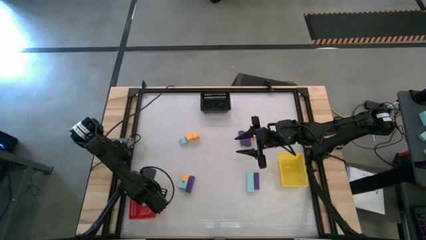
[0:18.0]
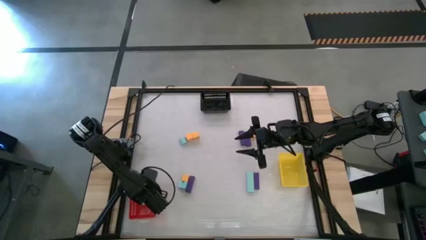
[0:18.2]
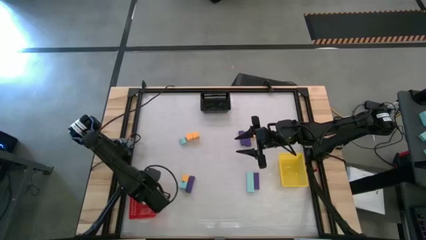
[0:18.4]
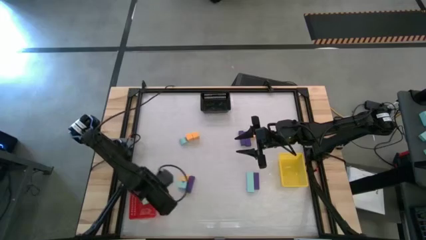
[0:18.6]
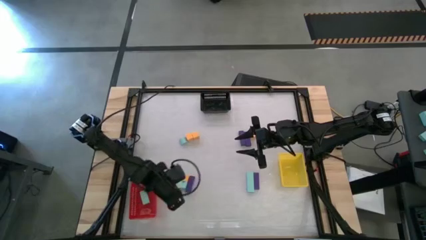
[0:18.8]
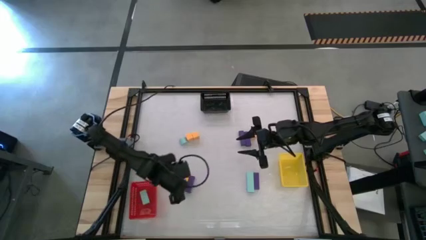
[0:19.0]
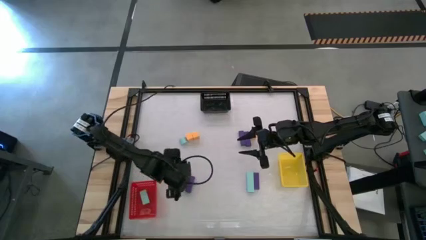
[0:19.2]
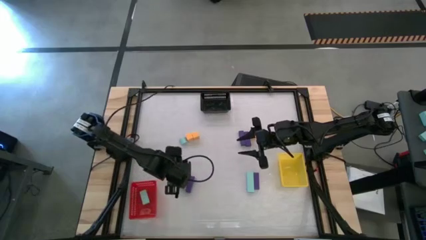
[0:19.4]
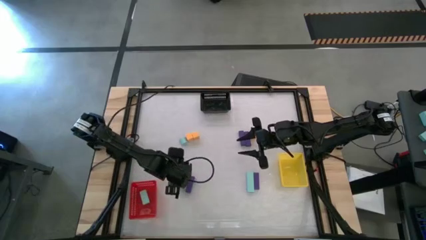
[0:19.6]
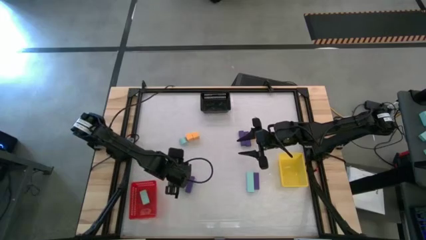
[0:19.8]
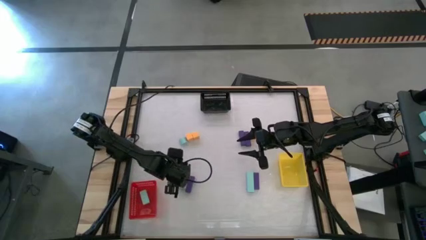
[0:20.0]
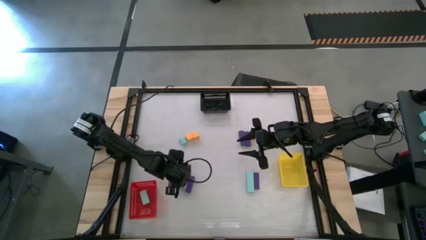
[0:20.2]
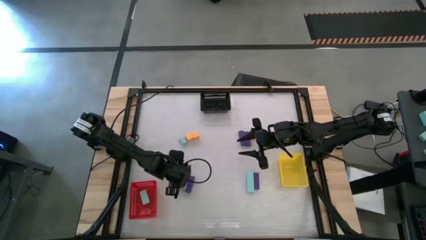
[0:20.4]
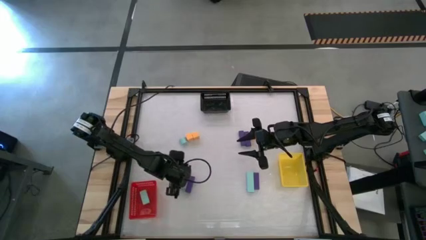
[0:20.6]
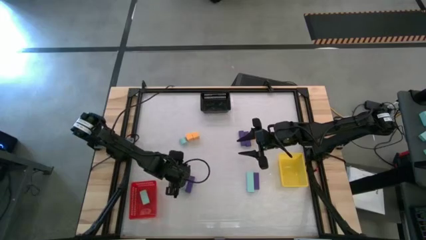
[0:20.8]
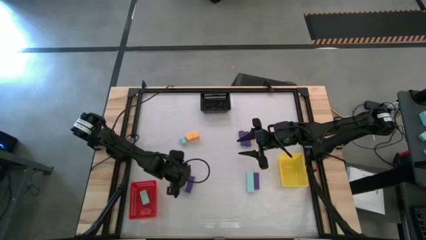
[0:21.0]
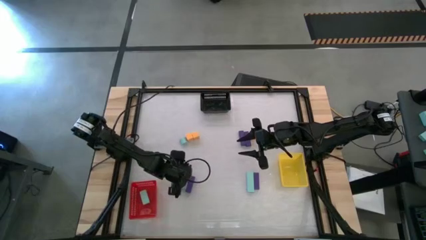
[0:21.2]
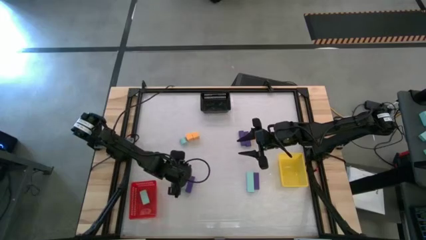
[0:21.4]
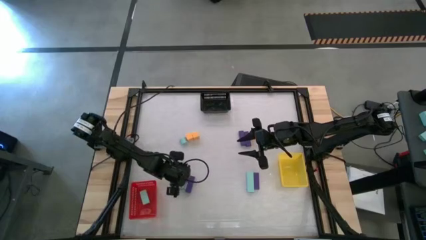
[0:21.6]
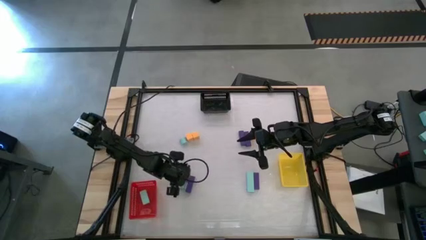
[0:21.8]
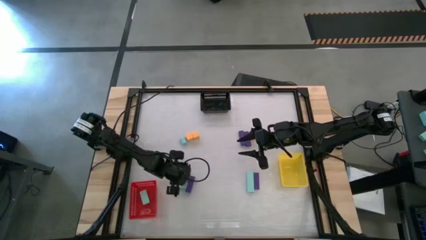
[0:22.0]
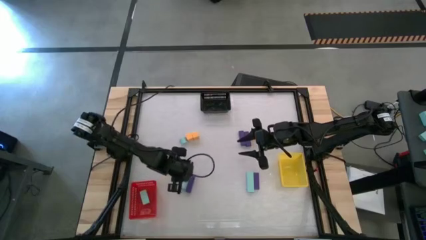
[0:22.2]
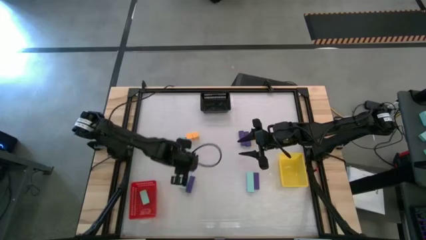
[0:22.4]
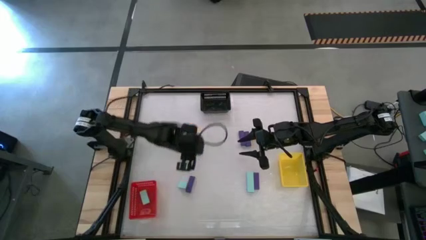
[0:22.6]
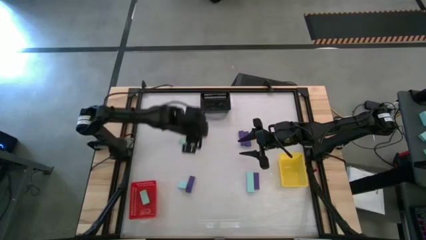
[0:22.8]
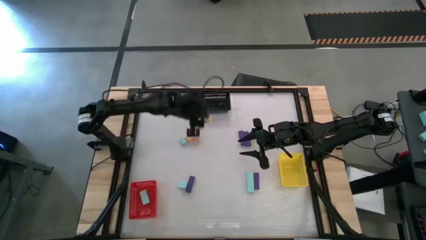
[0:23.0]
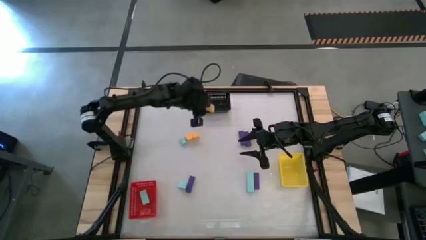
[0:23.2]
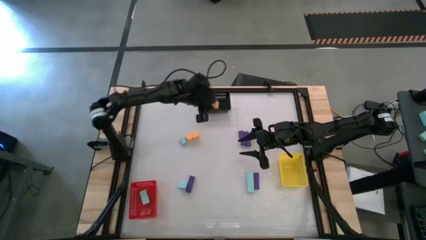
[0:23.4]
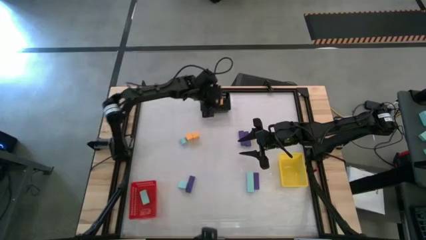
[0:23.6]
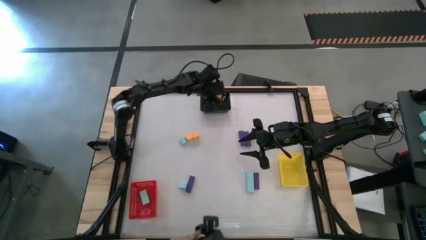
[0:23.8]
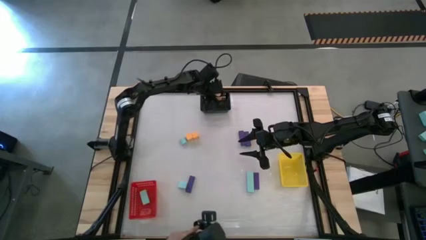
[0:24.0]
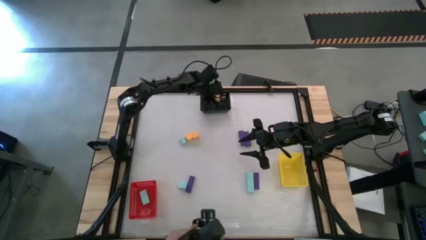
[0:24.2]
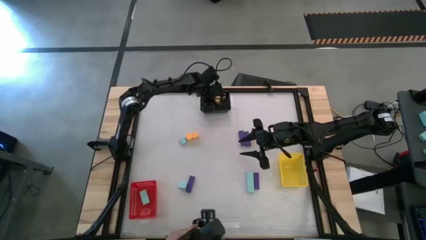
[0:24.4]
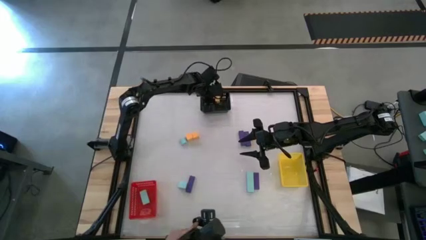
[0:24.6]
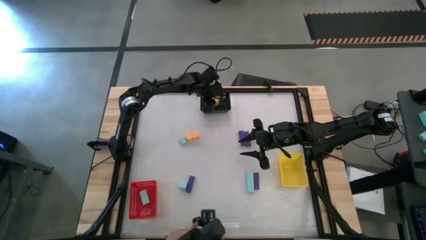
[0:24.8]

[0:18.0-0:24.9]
Task: Sort & place blocks by color
Put the yellow block into the black bin

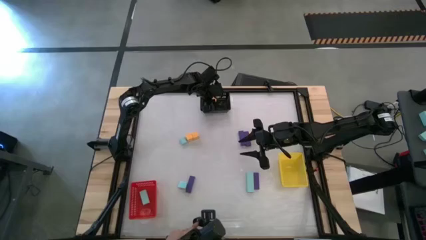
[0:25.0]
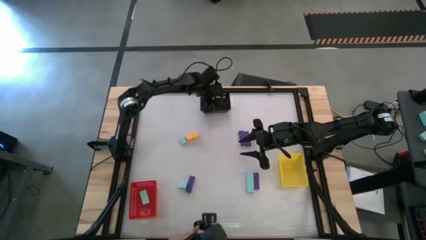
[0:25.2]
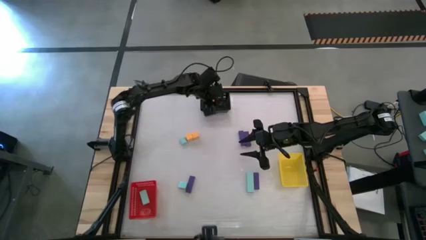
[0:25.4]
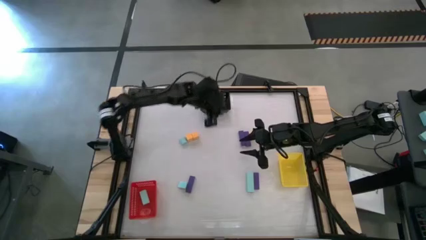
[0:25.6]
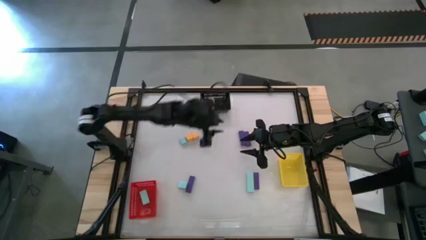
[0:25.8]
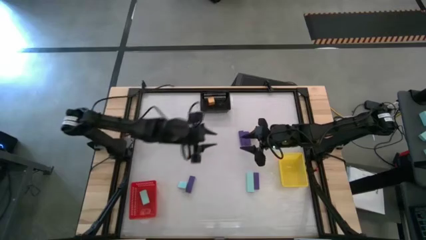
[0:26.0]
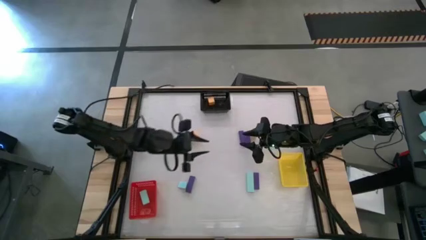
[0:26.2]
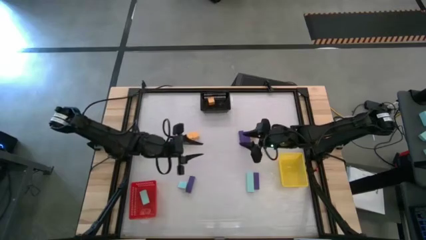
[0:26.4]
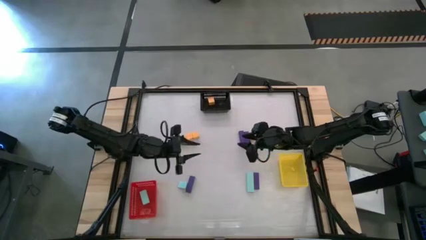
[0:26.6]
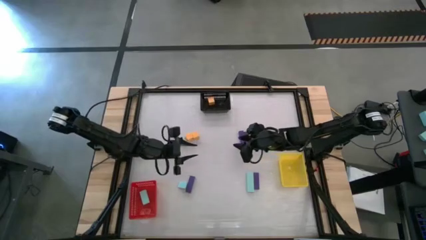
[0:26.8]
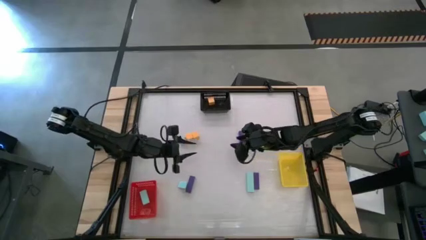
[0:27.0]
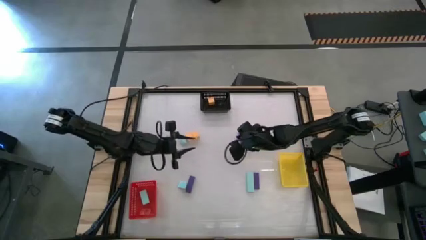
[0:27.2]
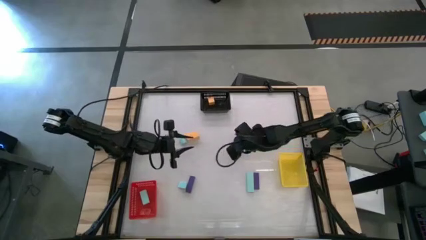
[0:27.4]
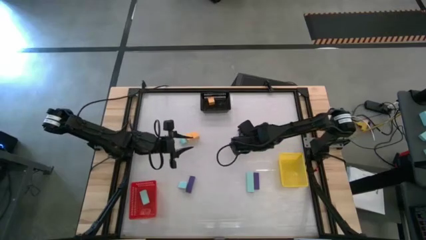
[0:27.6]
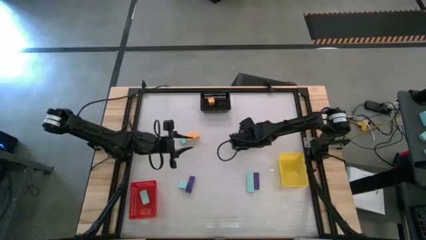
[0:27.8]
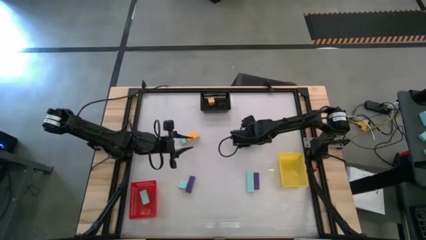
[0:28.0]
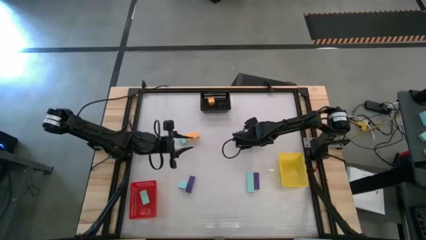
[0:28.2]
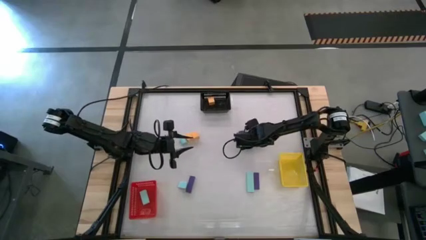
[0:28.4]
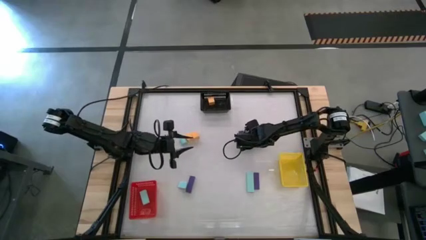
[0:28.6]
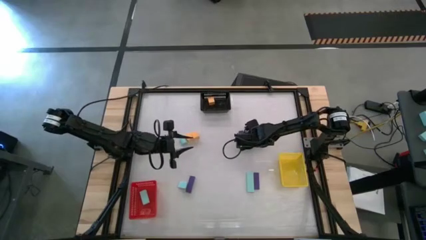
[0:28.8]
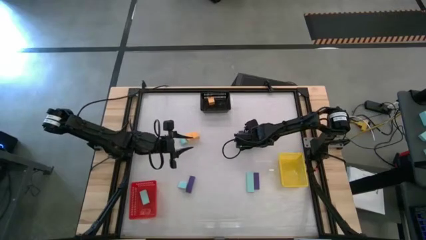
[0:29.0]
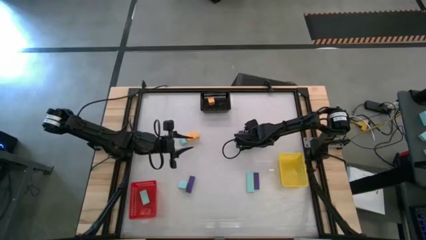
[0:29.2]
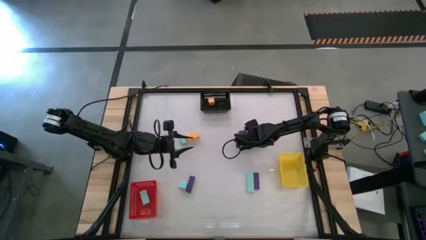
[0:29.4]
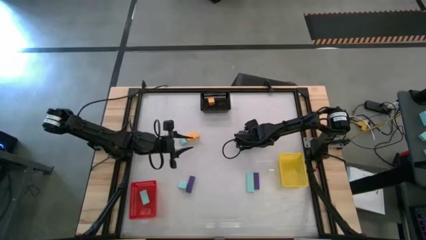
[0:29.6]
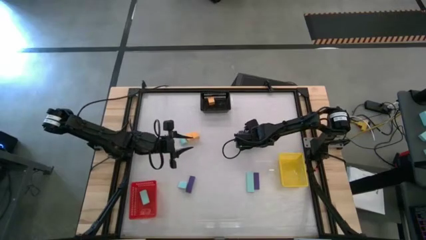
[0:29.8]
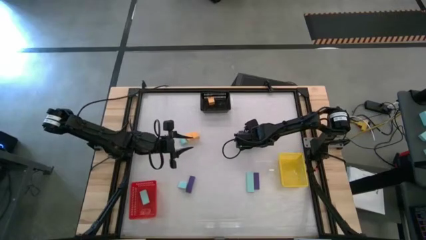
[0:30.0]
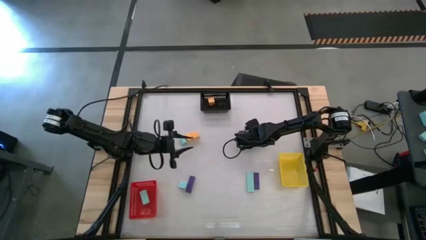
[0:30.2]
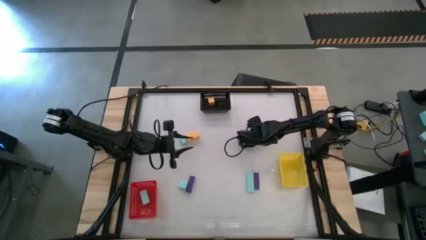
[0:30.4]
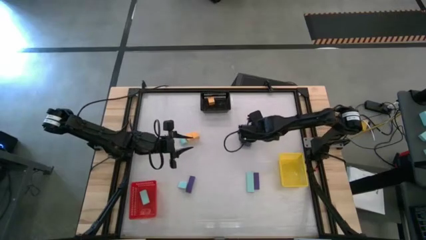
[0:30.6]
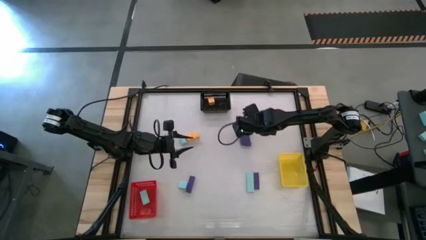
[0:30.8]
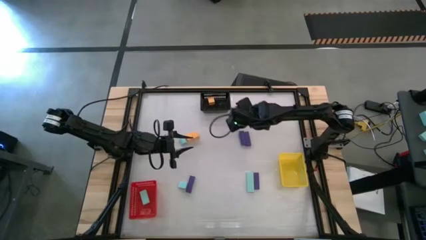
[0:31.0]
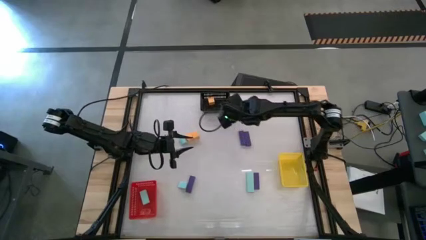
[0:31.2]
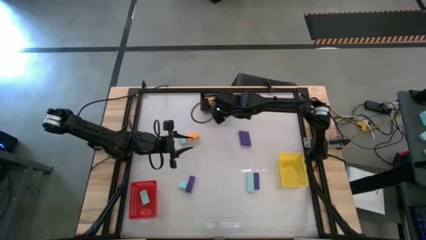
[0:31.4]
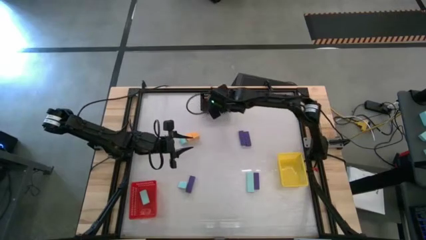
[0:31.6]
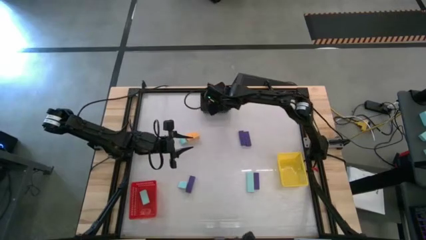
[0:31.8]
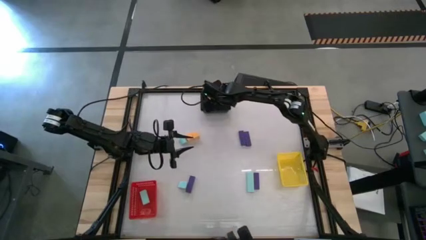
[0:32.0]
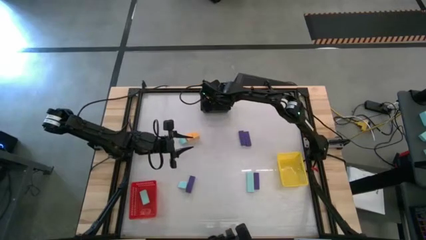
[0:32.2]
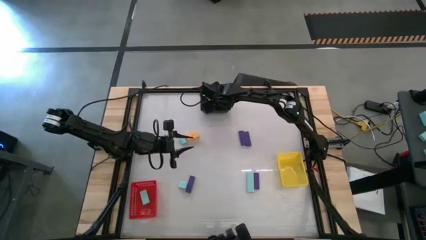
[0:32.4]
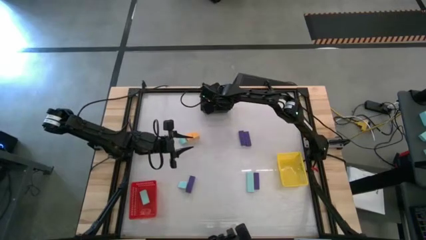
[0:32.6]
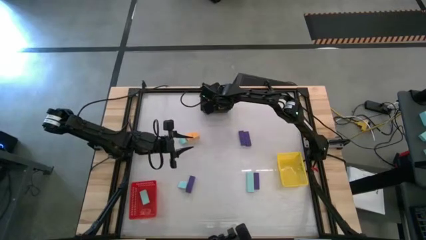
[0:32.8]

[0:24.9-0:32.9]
Put the yellow block into the black bin
